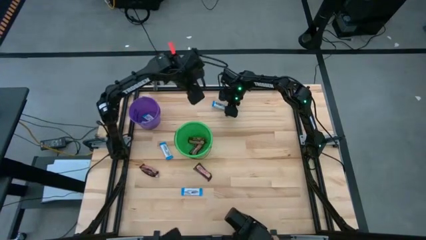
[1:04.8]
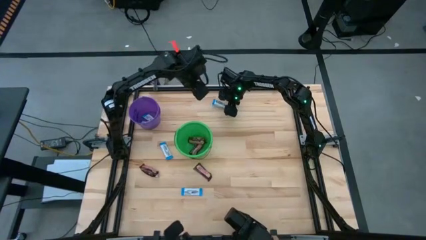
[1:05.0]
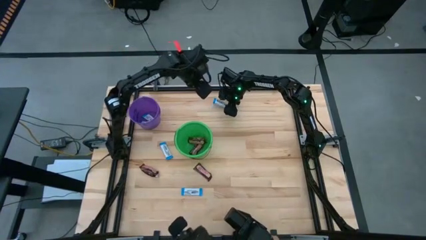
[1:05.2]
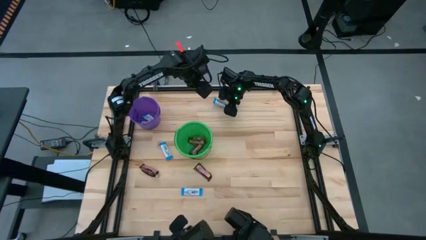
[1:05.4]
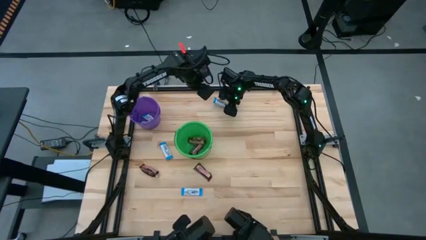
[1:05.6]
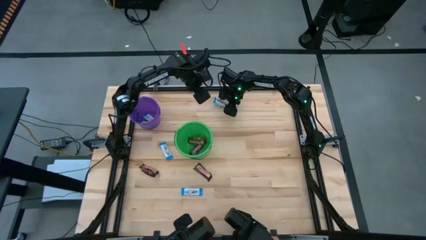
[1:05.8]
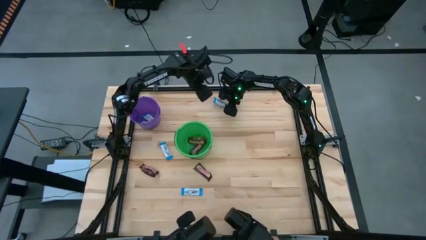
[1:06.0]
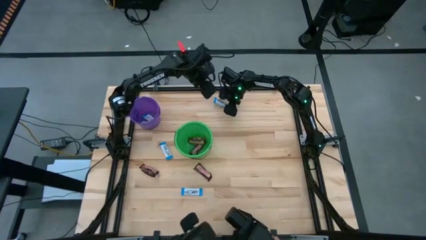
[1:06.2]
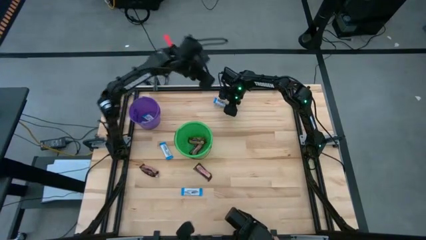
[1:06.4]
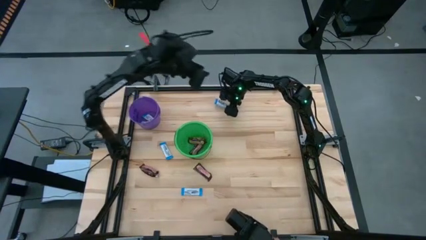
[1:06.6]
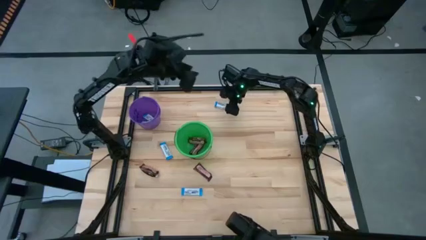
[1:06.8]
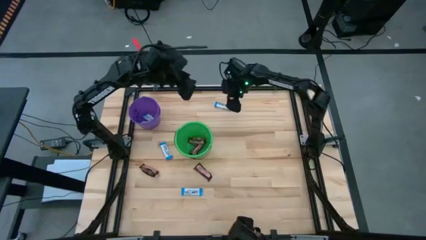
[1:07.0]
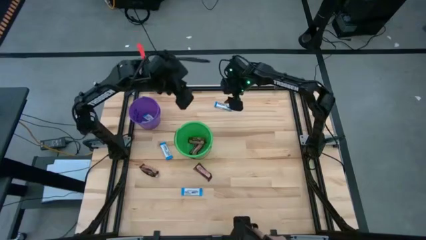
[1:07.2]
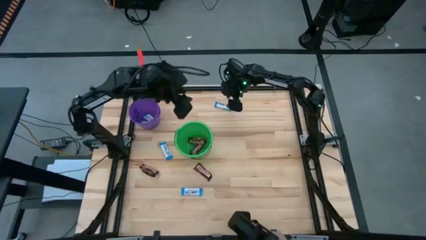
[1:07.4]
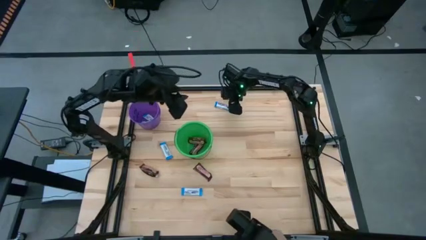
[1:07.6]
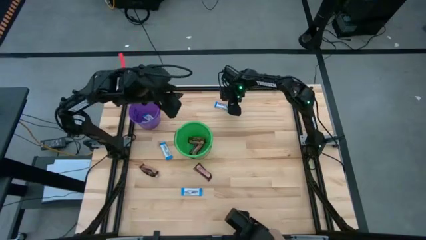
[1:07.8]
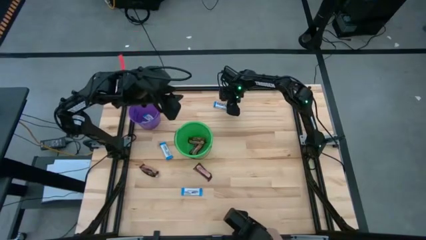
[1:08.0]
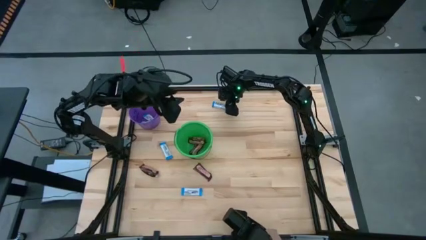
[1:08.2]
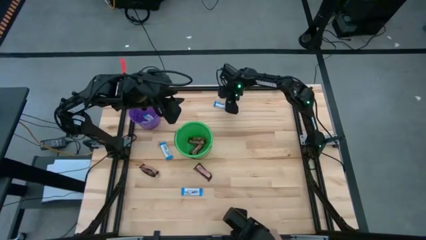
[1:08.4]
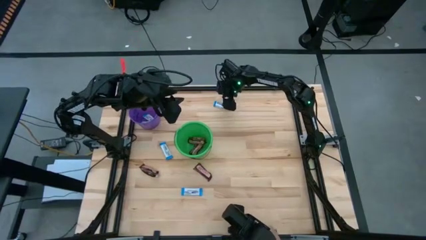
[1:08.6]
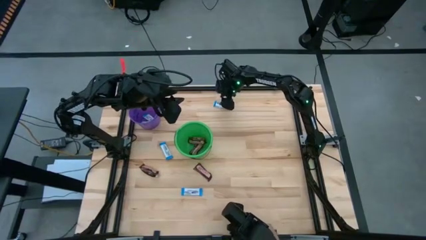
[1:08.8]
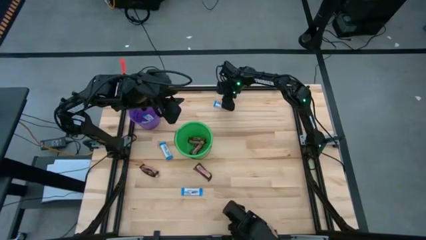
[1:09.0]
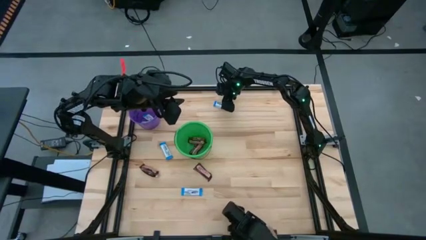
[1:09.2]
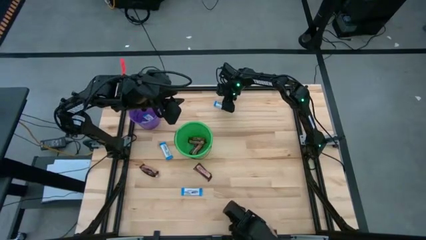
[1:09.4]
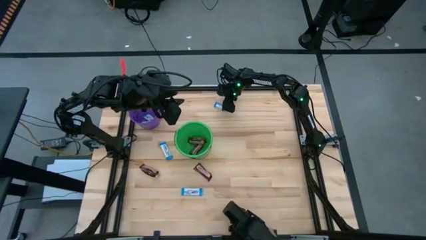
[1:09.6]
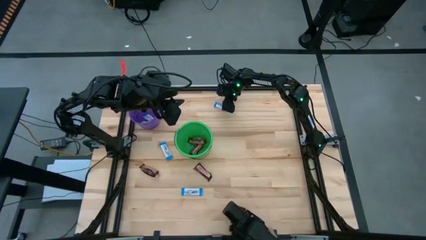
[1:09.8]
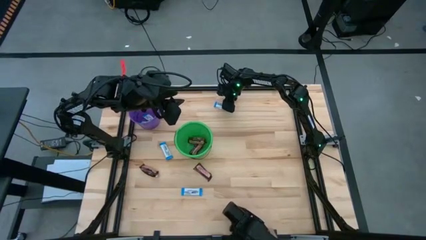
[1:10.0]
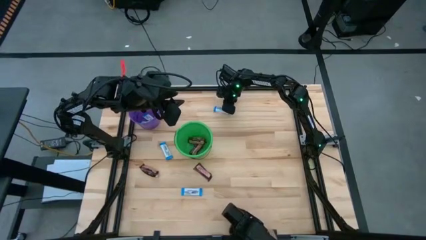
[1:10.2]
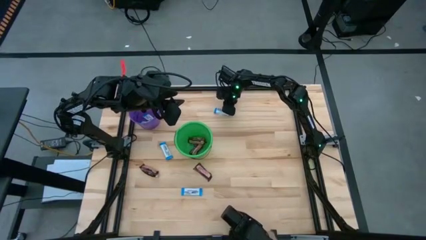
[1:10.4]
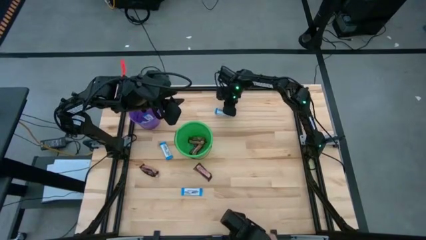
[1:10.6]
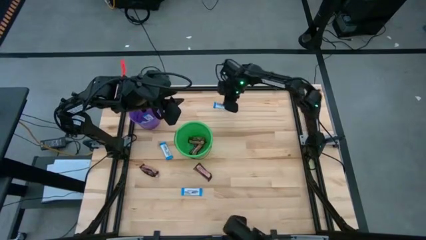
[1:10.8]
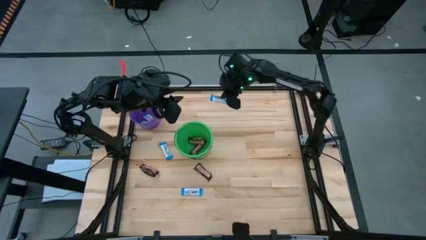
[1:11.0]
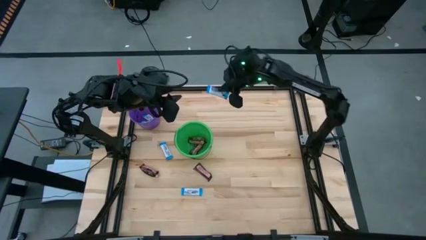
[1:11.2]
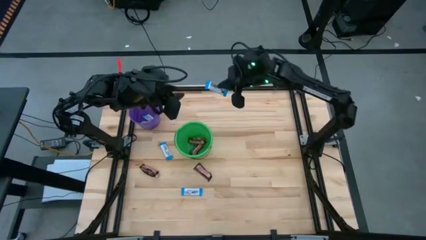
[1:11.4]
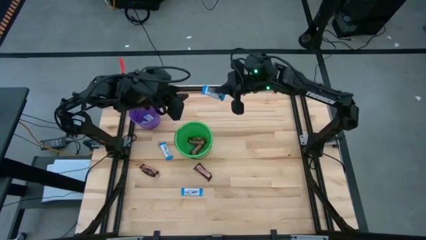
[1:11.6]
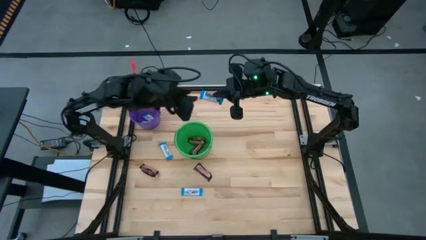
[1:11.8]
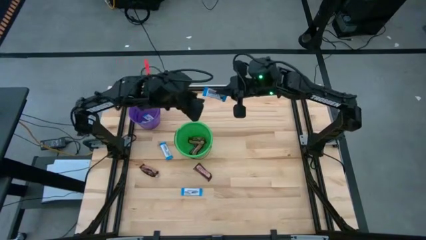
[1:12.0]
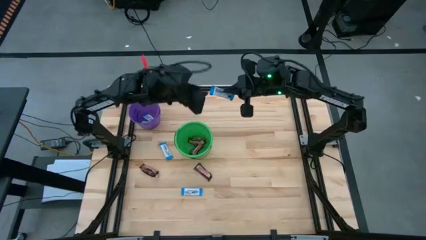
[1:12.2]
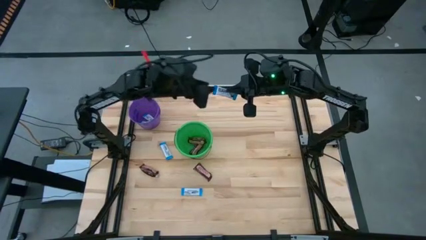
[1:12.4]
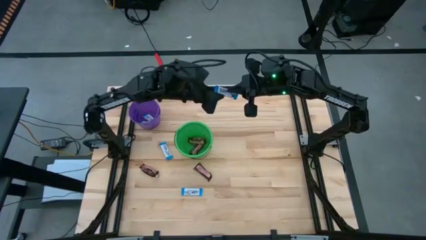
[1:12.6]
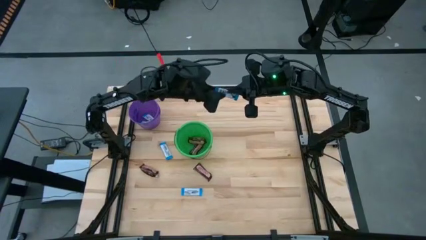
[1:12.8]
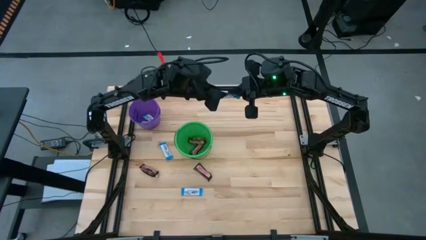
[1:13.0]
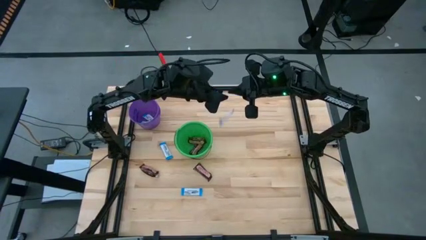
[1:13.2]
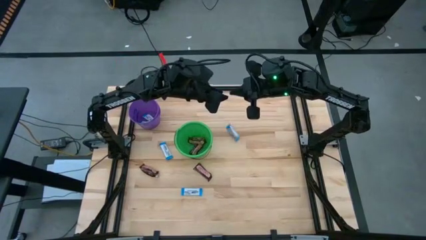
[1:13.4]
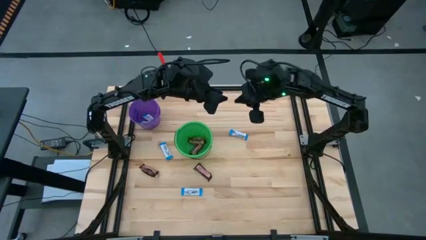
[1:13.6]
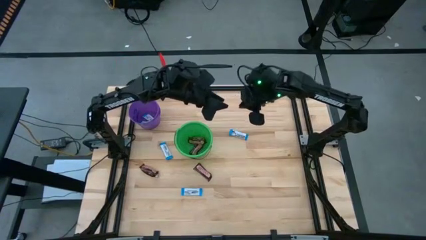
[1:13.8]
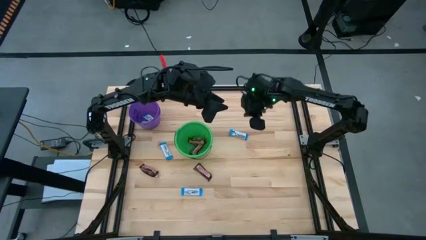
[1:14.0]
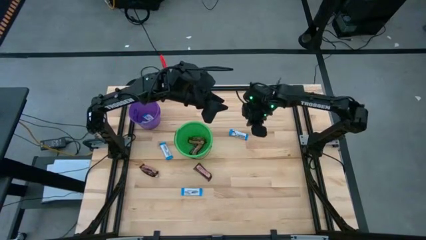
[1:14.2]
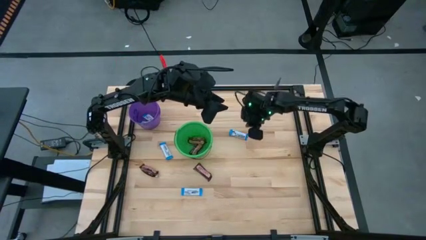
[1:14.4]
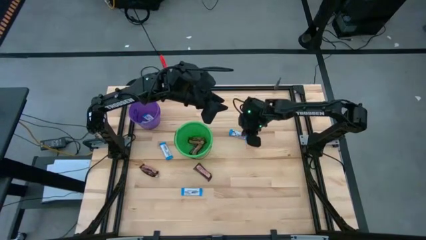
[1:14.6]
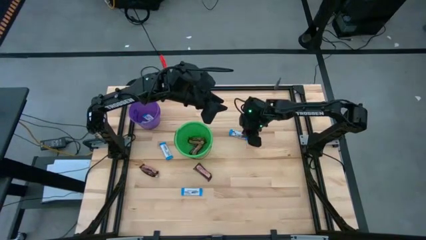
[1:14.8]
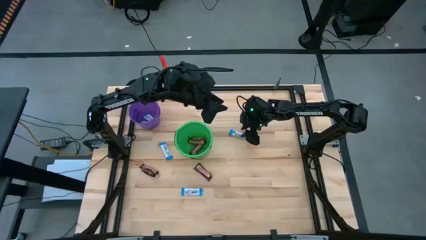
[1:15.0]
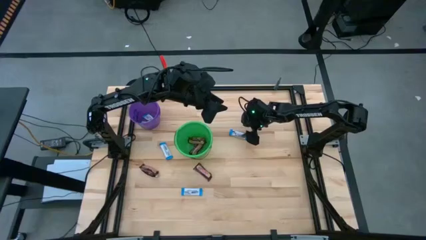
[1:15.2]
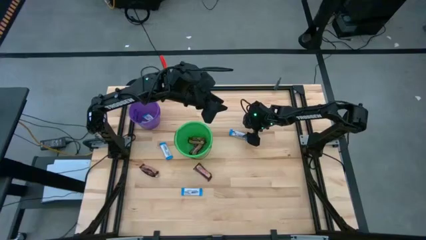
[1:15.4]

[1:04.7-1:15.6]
Task: Sort candy by brand, put in halloween buckets
Put the white chocolate bar into the violet bucket

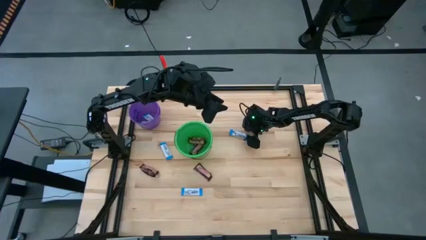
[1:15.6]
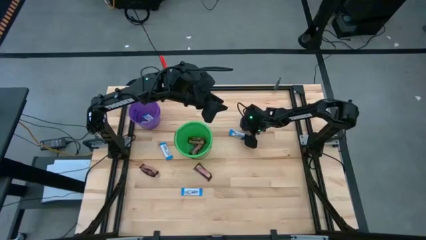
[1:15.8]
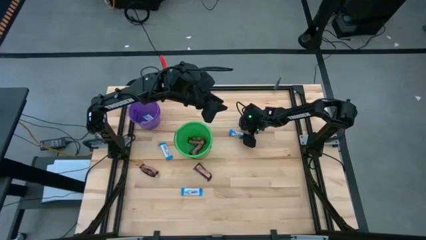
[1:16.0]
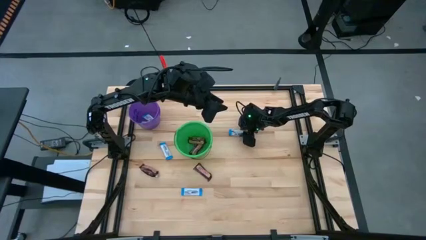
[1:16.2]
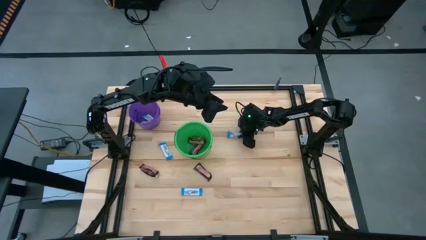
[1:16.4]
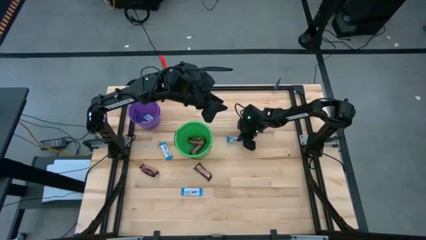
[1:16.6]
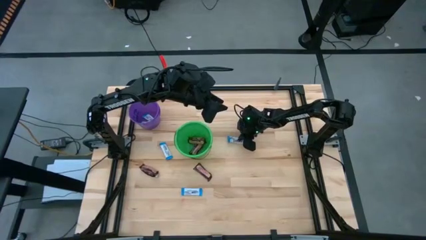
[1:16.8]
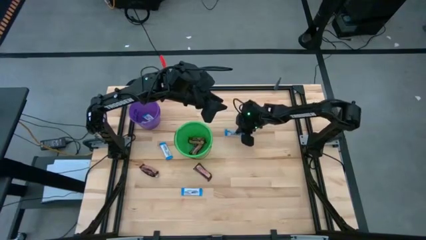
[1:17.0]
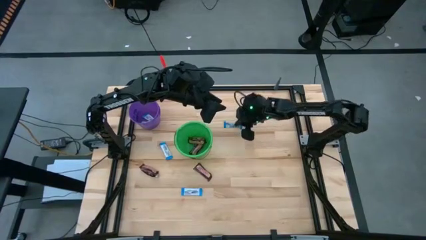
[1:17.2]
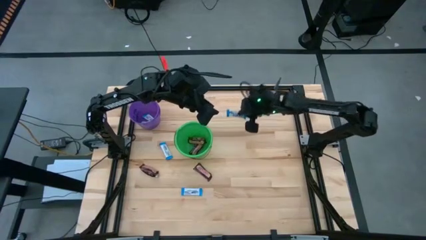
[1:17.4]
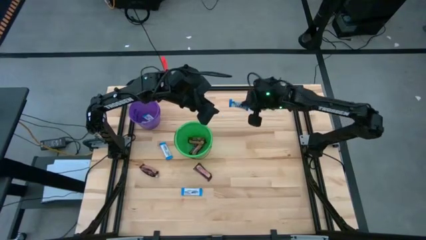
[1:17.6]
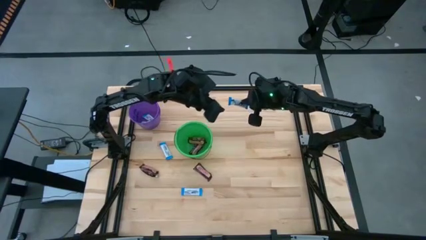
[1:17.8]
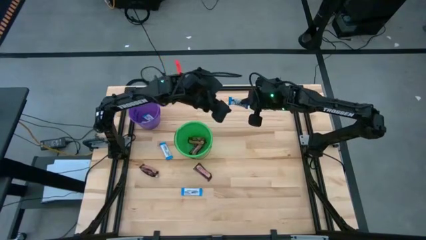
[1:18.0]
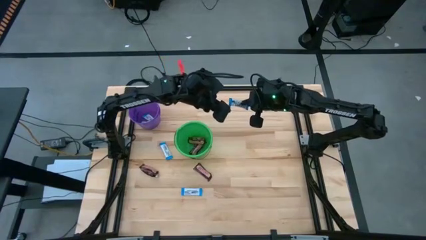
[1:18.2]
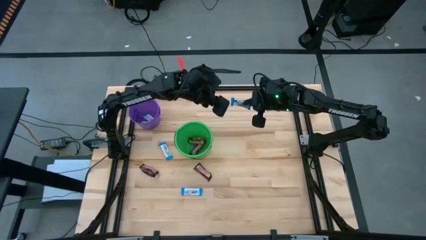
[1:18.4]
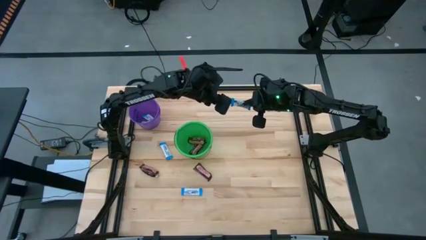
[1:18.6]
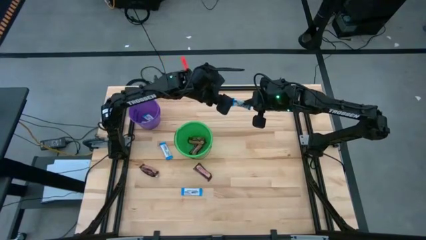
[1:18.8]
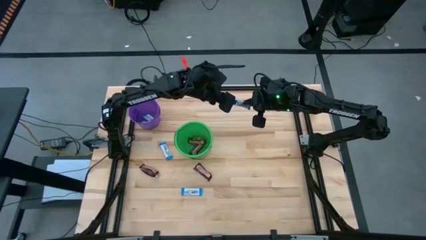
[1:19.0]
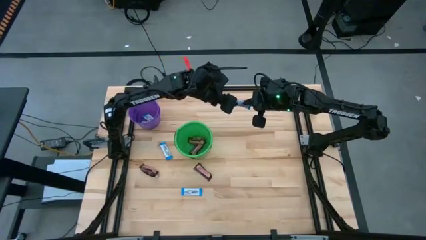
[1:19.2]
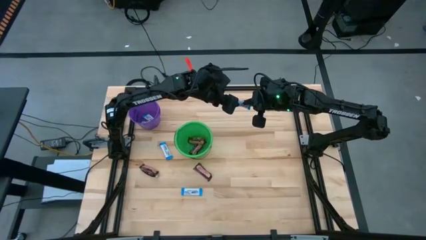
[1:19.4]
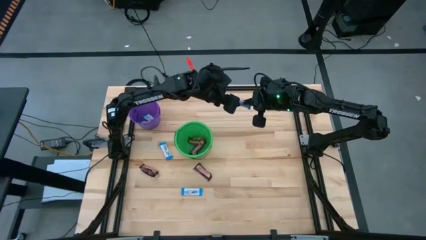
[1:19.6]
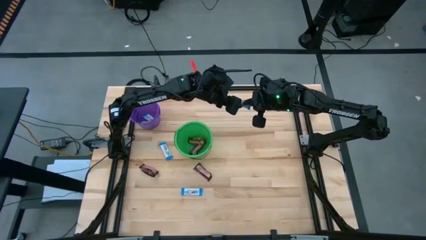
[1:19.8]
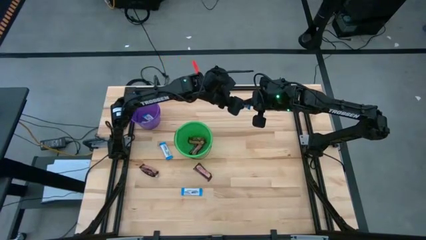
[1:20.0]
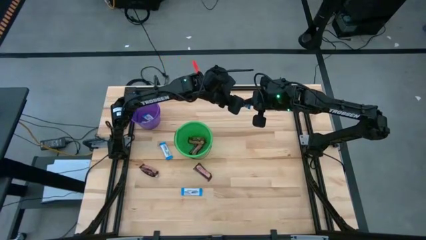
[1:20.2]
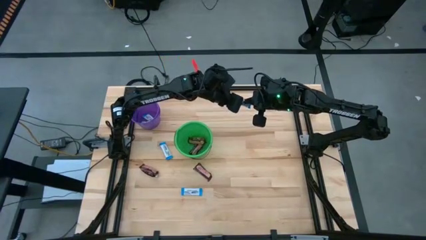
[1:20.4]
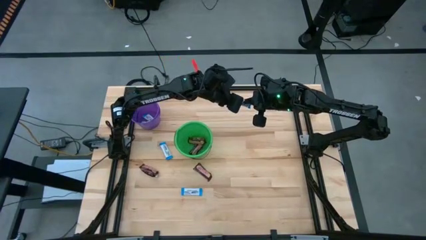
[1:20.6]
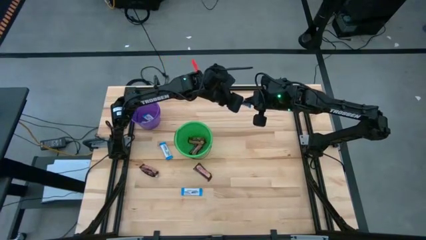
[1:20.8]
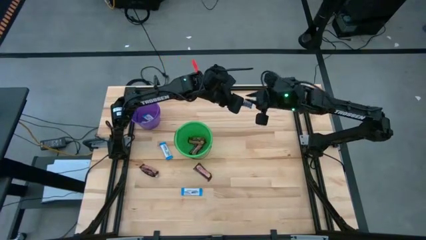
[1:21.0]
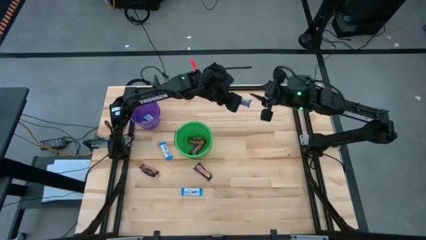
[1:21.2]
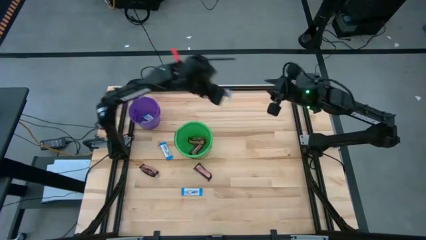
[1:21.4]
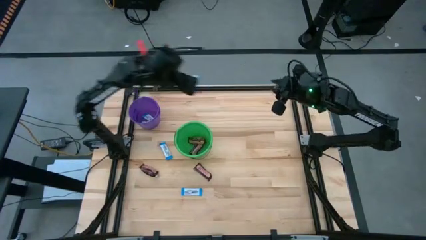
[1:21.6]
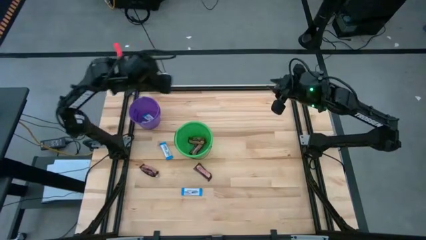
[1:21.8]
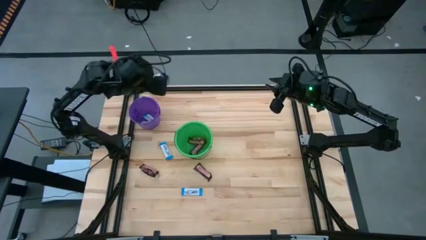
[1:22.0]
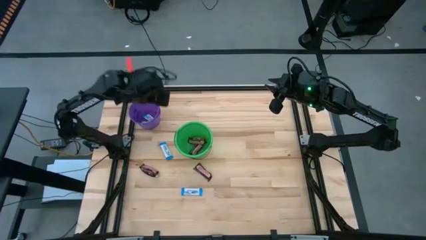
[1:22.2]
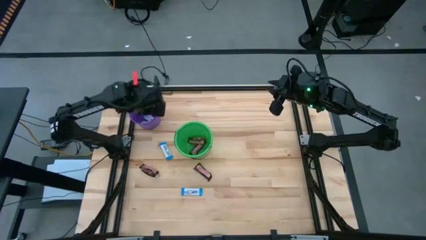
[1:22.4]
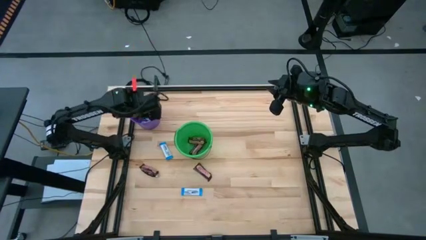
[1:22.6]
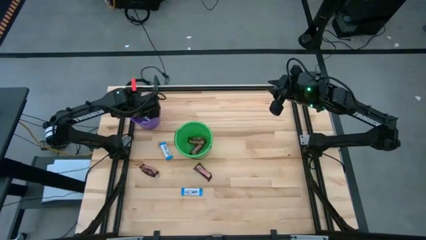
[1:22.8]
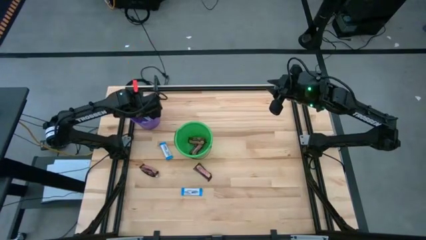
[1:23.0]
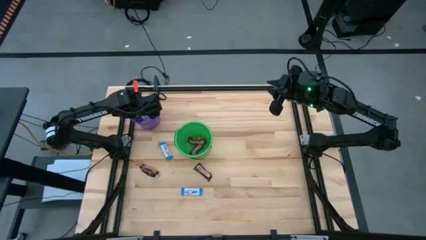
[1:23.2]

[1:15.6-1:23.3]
Put the white chocolate bar into the violet bucket
